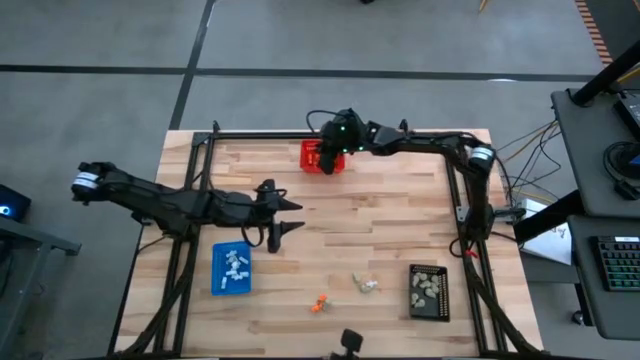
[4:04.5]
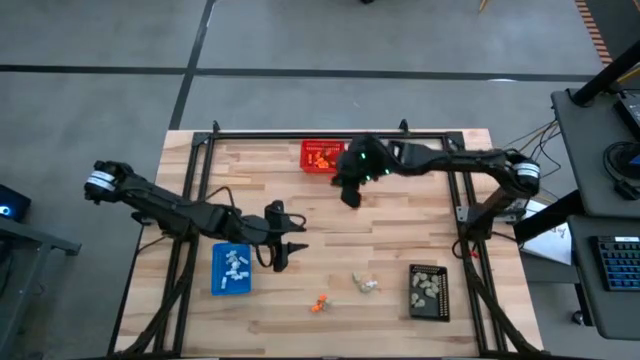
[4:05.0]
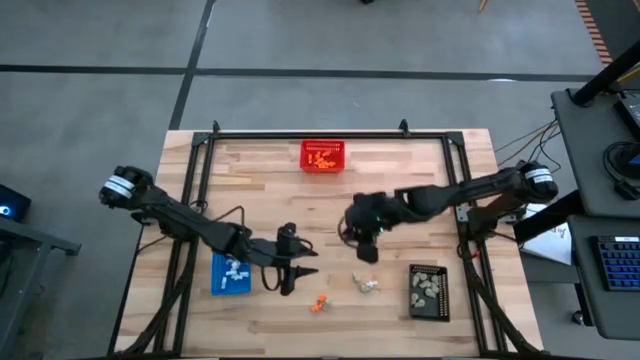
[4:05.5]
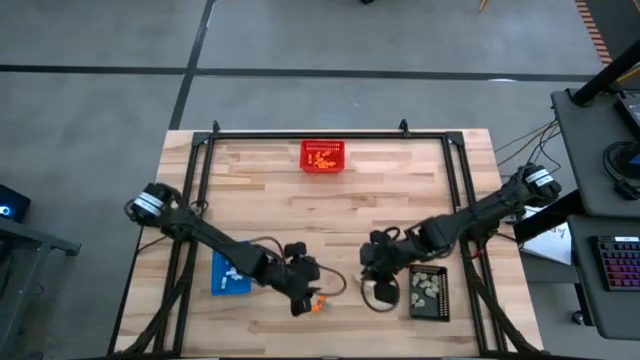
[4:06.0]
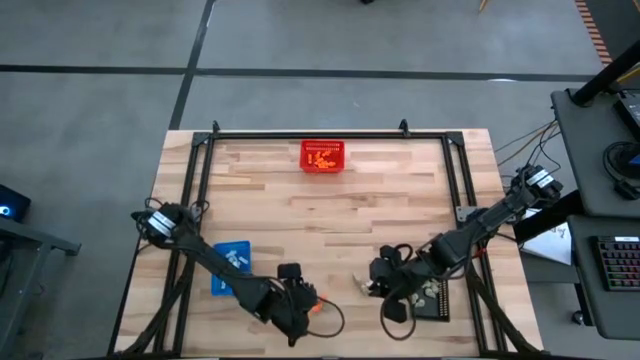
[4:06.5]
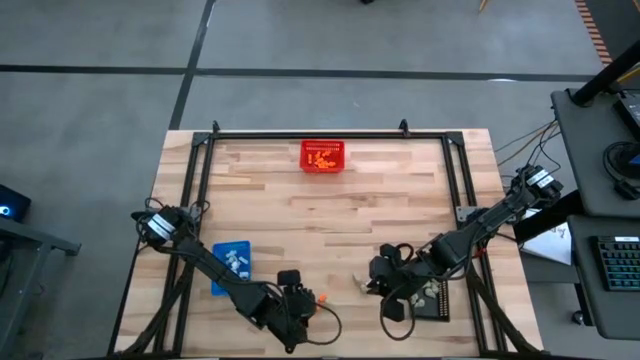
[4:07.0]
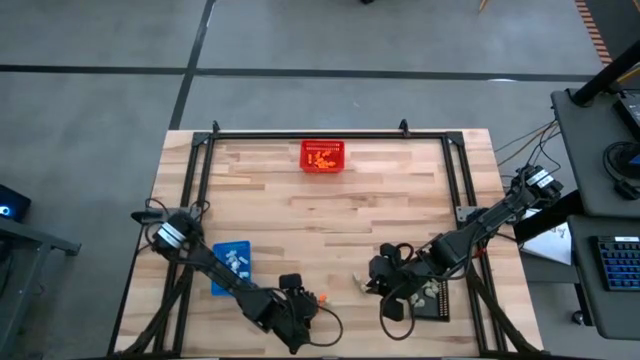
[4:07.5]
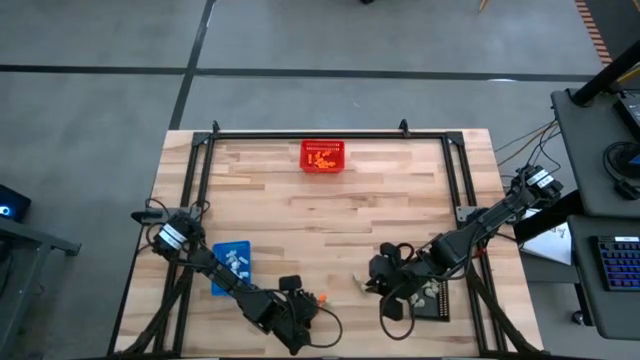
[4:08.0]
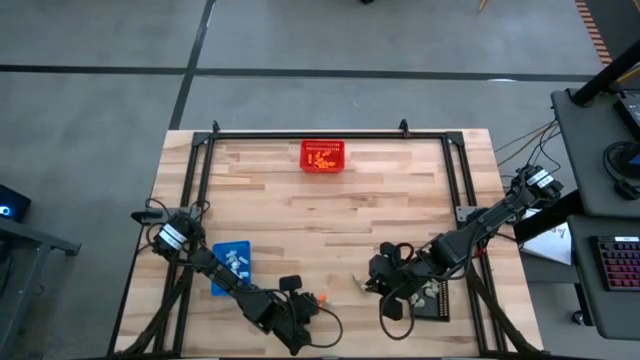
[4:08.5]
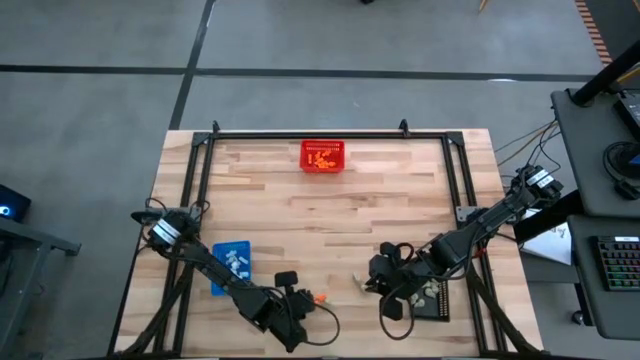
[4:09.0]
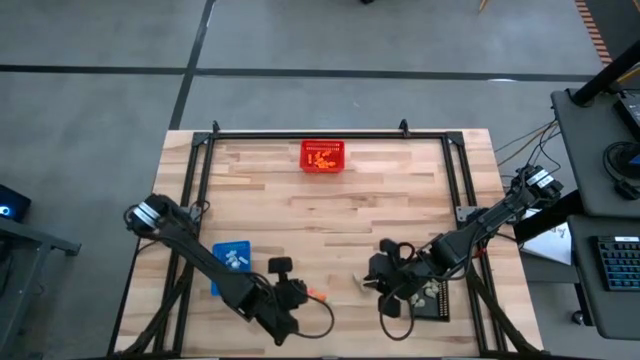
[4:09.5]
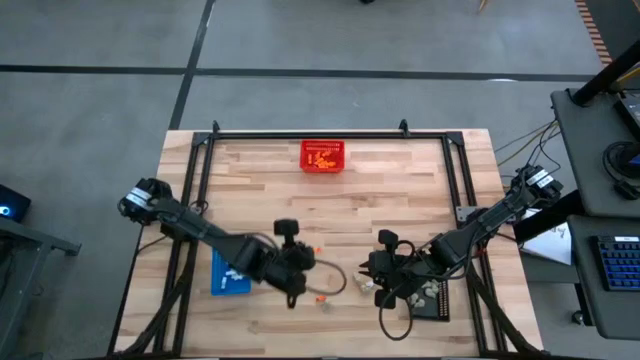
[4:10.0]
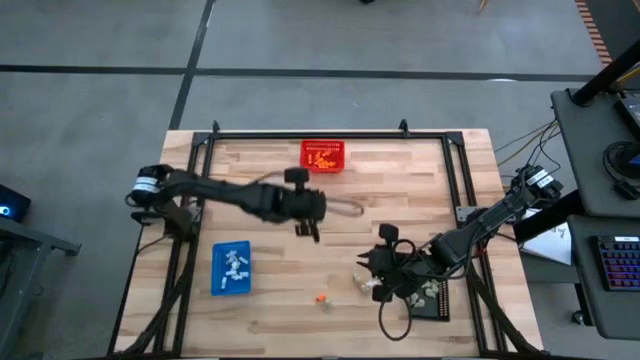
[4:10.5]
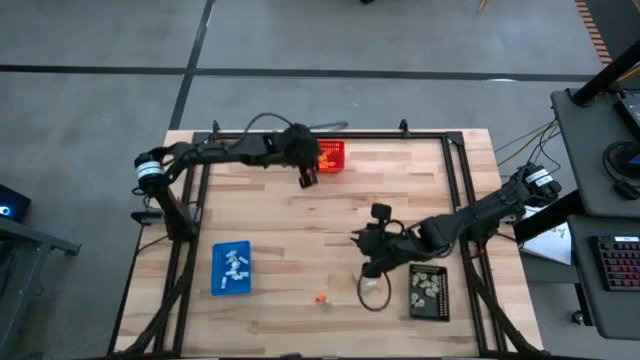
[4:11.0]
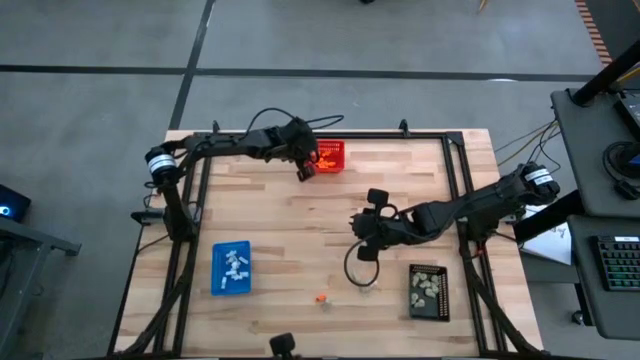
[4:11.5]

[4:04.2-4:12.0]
Task: Sort Halloween decoration
Put the orange skeleton toy into the red bin

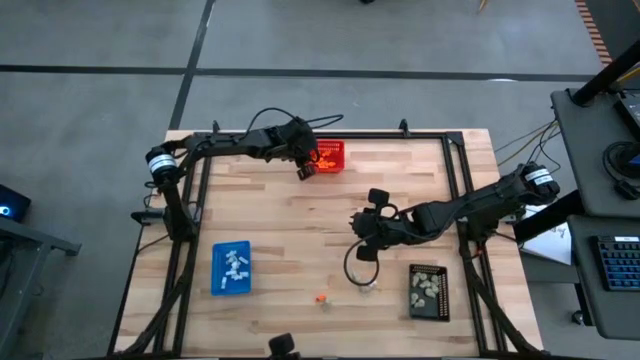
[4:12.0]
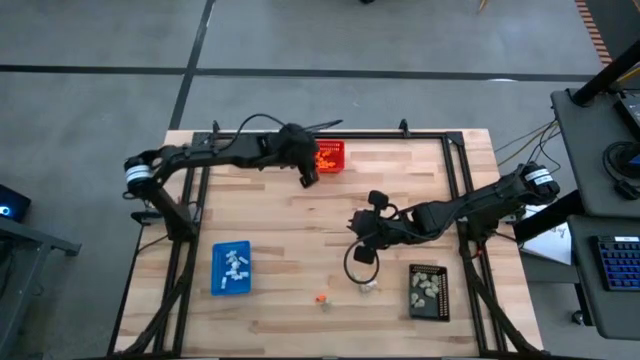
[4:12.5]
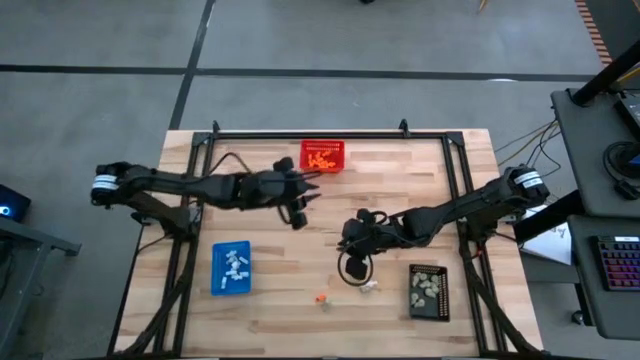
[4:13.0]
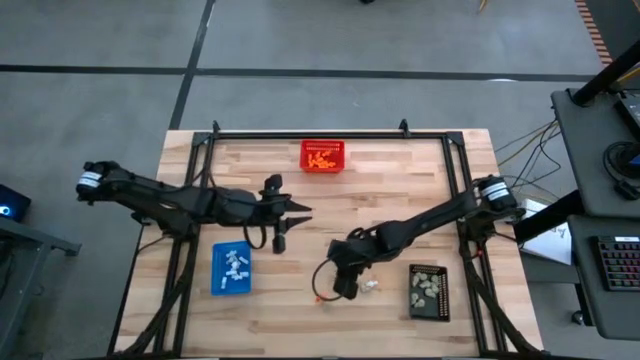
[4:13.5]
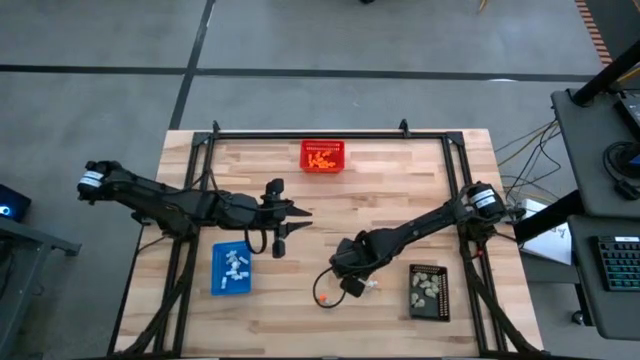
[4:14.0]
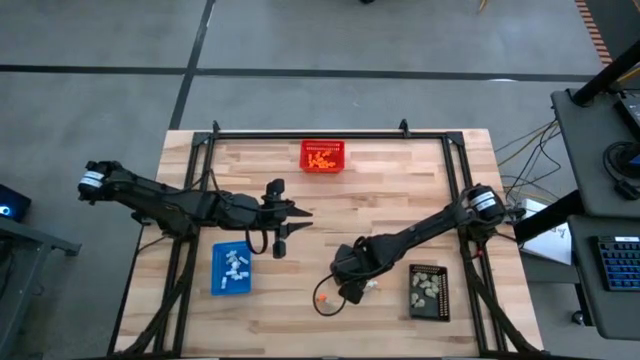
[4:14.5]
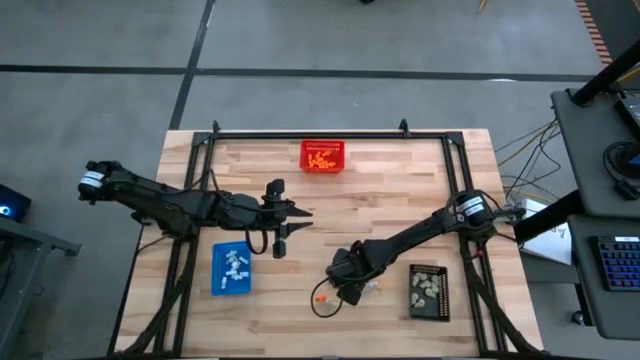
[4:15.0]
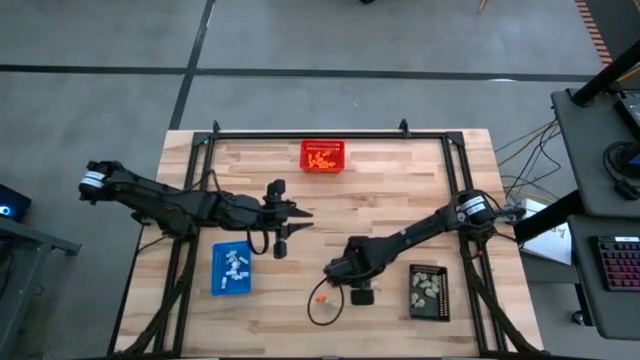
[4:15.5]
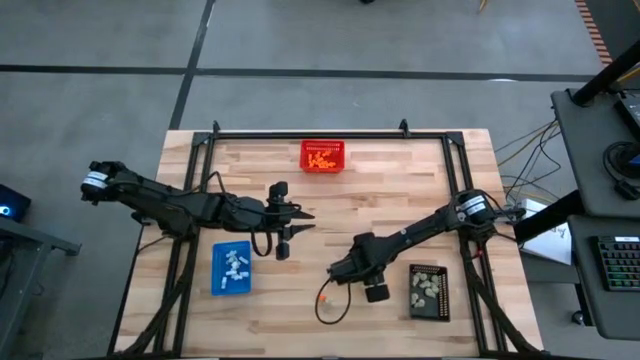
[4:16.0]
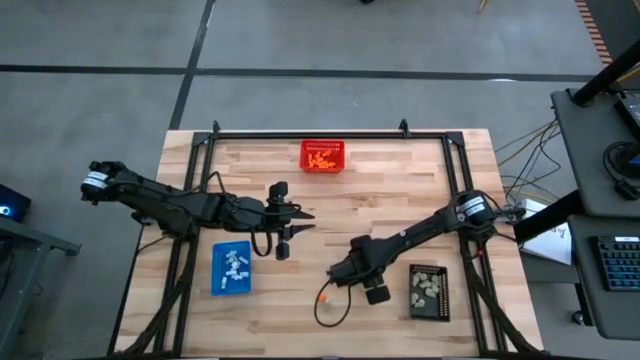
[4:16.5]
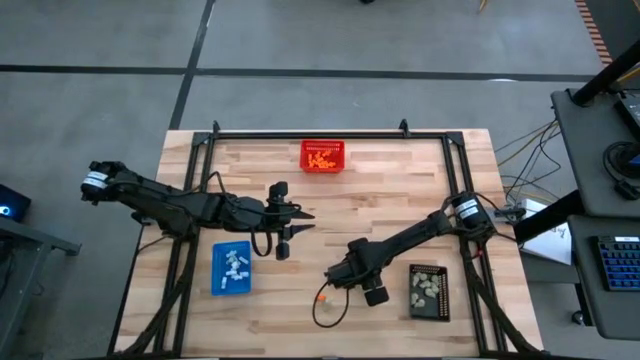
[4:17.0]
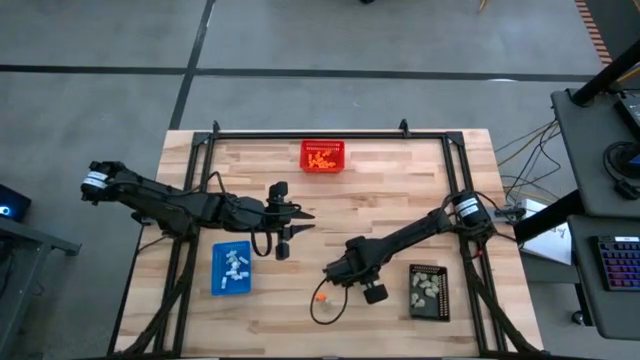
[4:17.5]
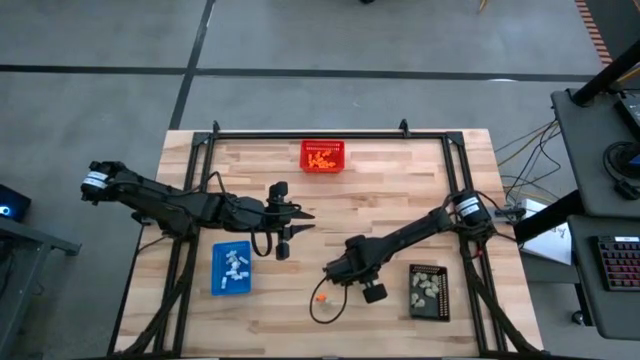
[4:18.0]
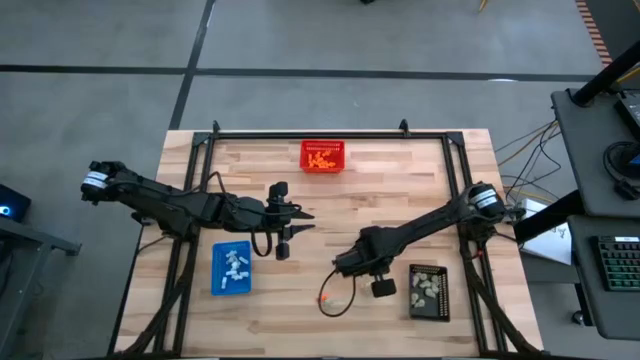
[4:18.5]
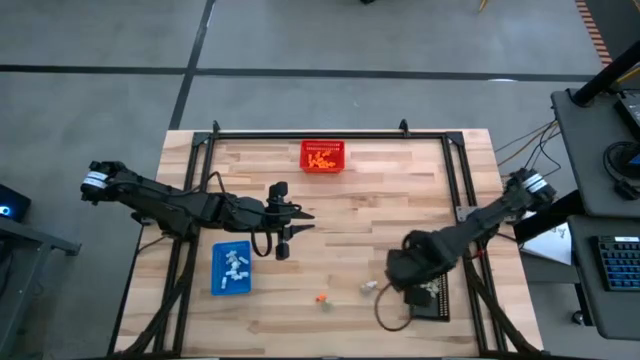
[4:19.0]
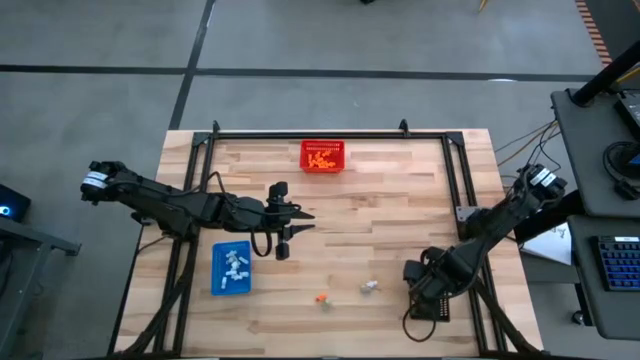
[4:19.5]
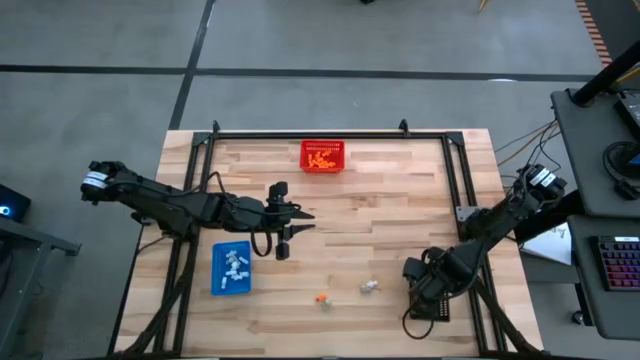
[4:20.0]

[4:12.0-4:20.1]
Put the gray skull toy into the black bin

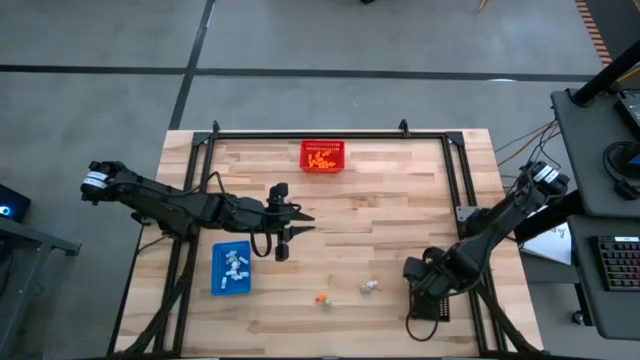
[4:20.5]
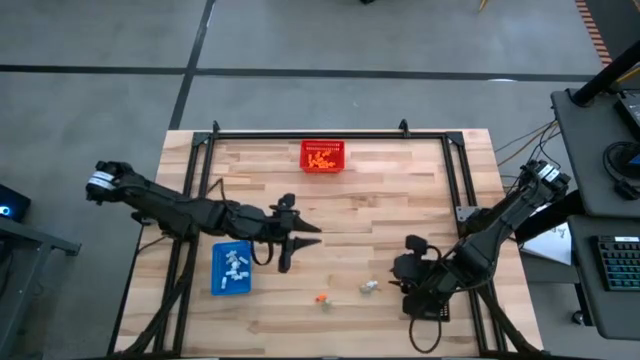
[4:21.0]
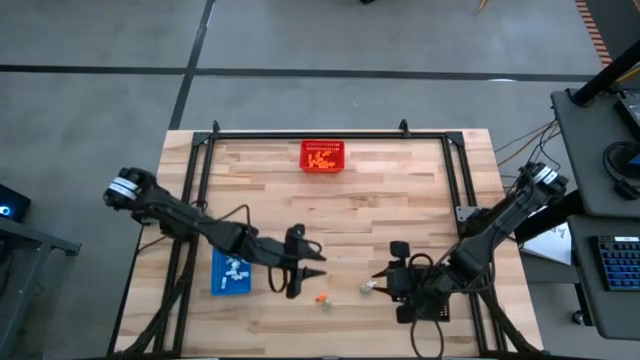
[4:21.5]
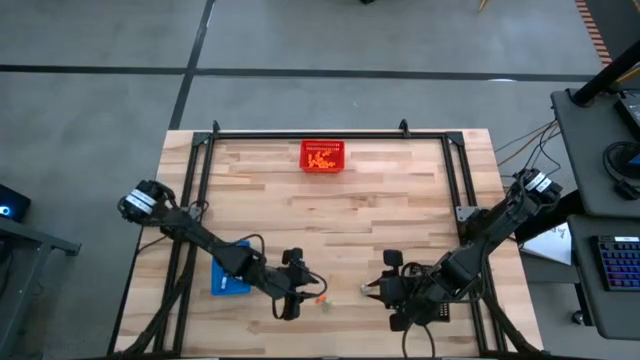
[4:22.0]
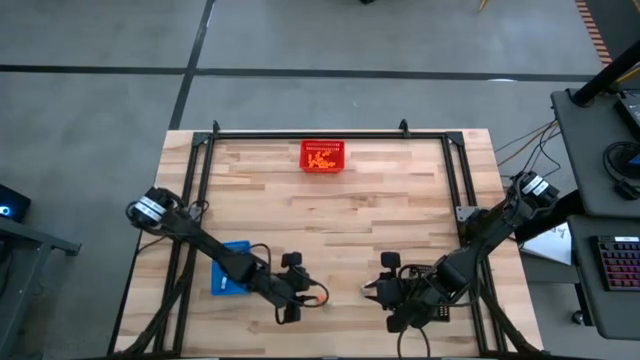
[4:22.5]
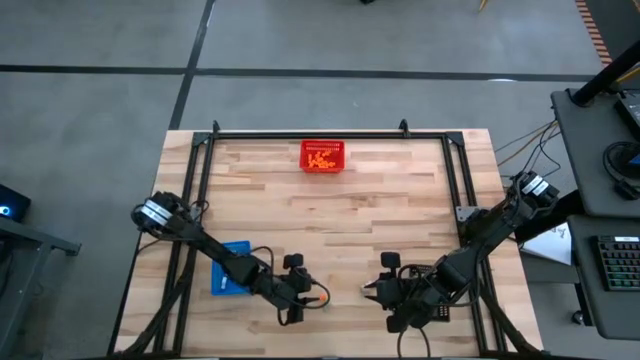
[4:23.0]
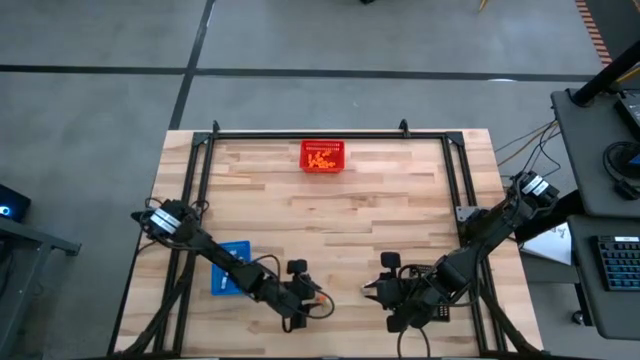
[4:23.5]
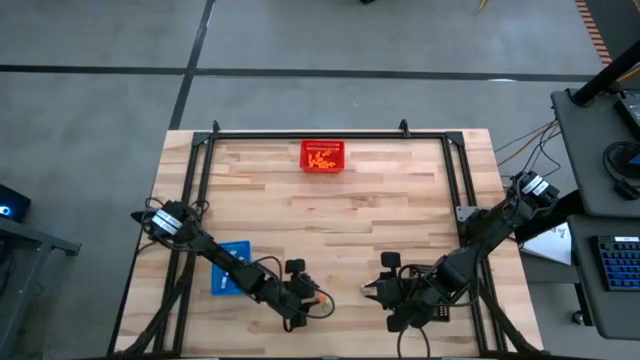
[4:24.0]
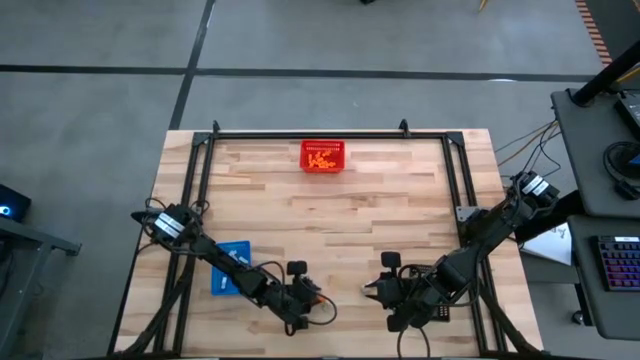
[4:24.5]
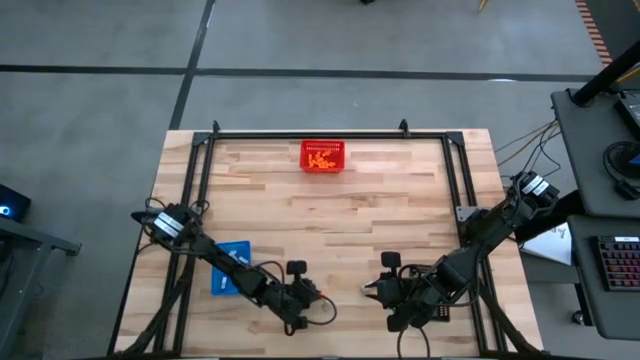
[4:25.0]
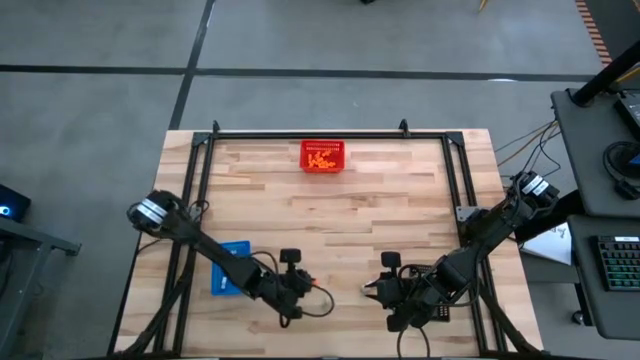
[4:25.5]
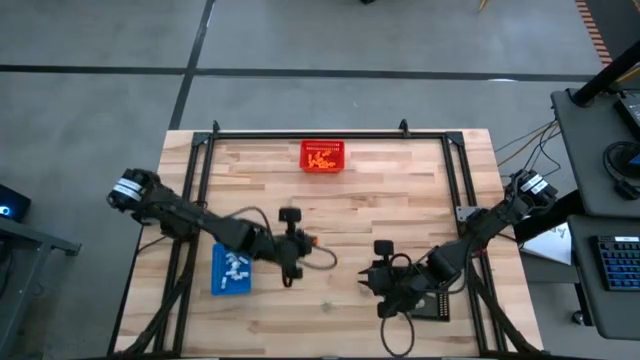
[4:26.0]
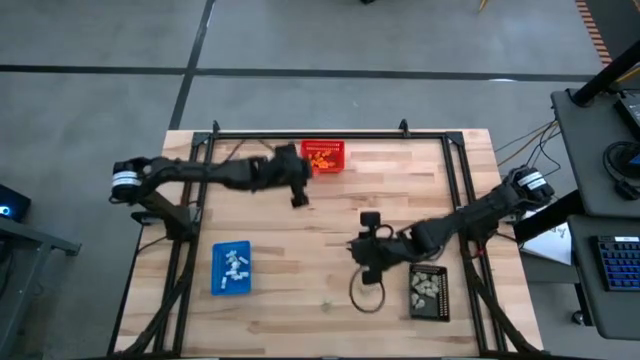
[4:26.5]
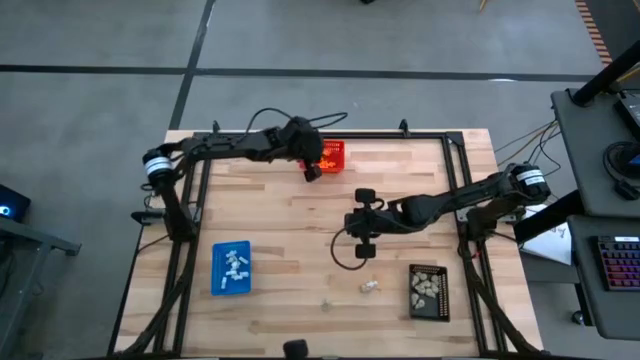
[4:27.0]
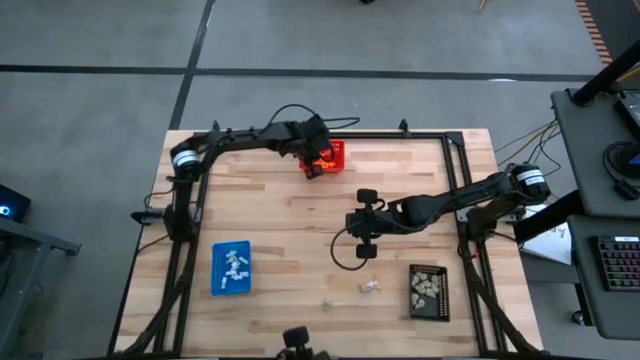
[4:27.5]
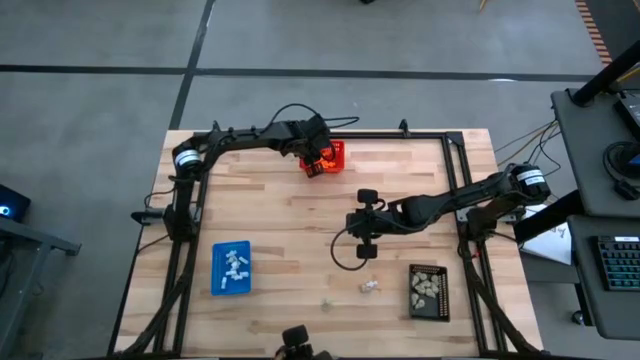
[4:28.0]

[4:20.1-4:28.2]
Put the orange skeleton toy into the red bin
